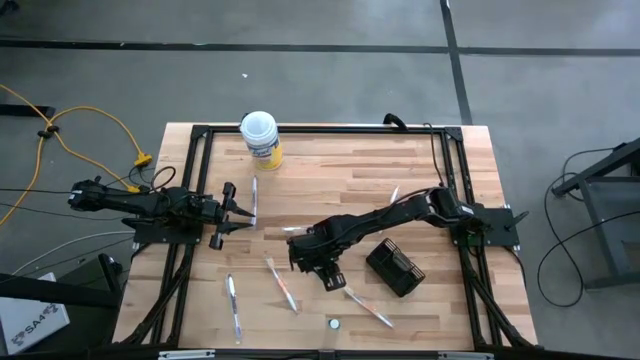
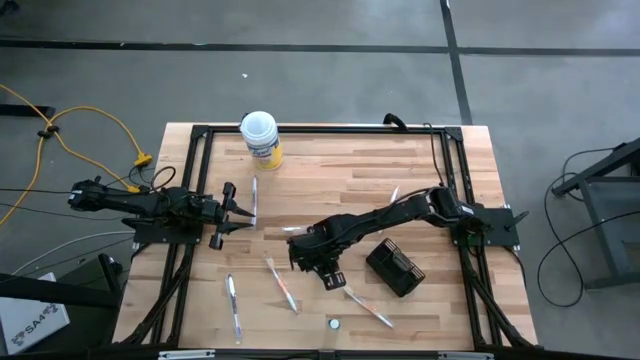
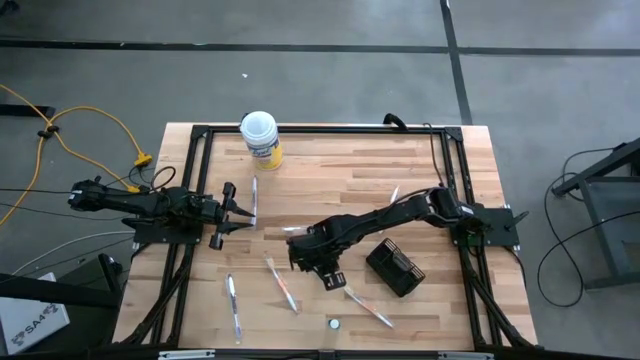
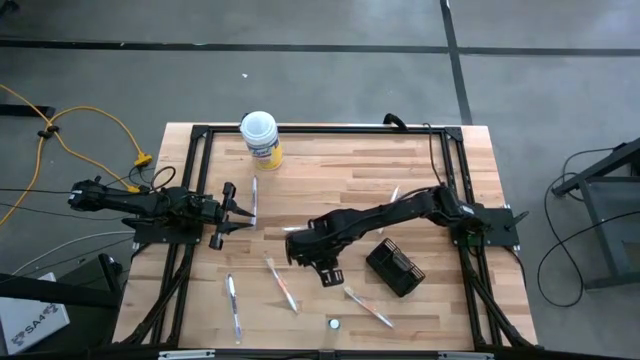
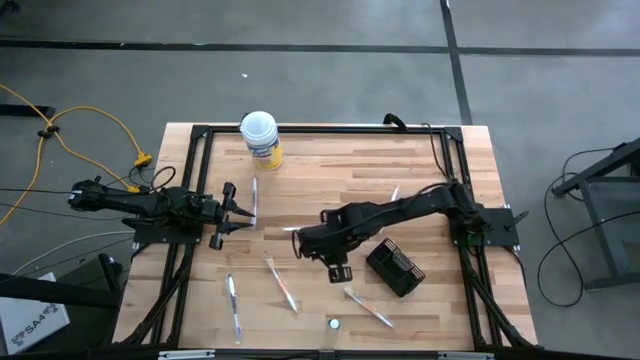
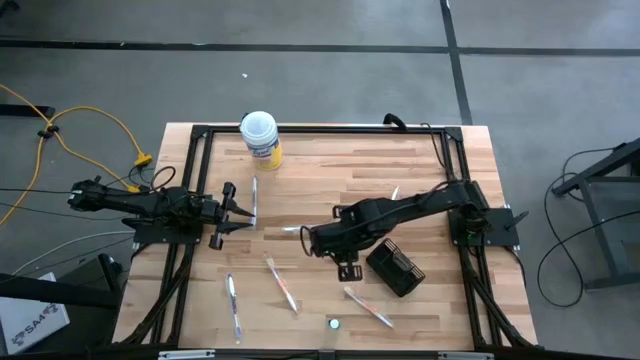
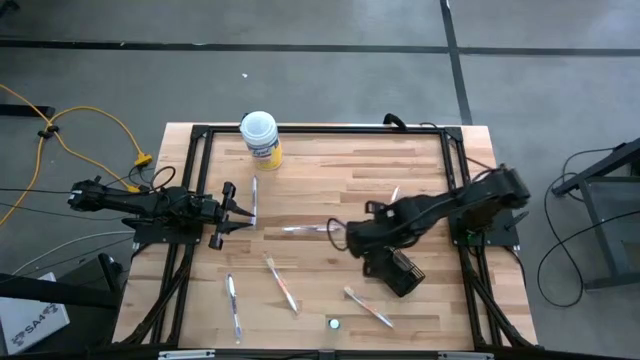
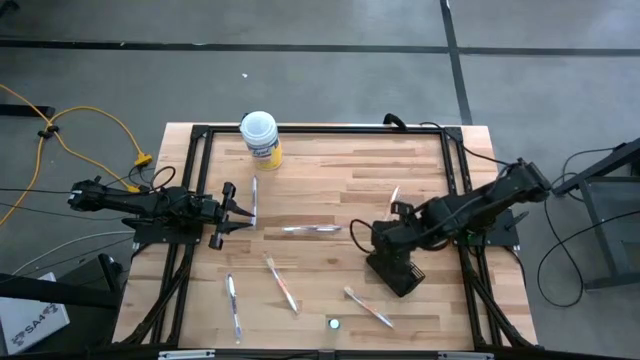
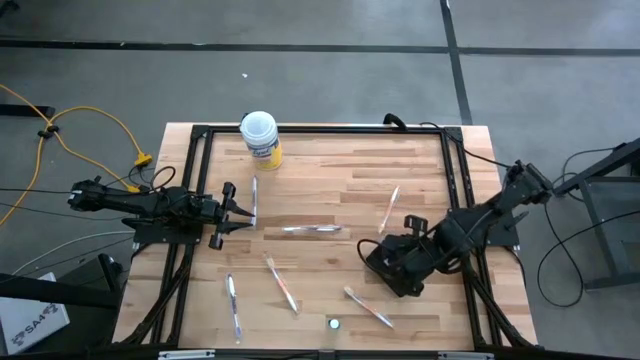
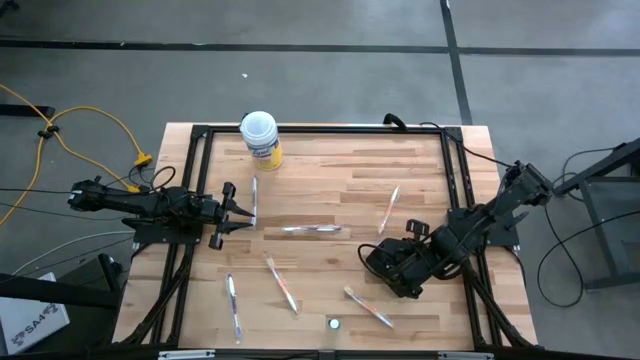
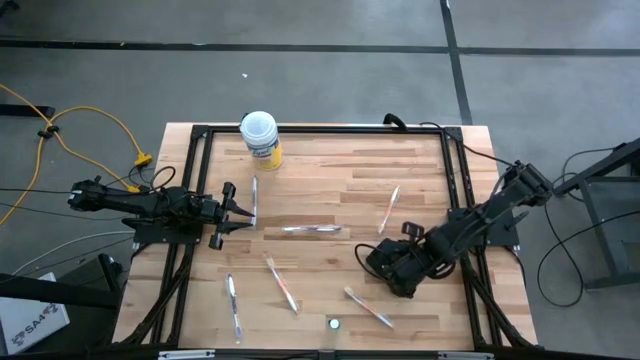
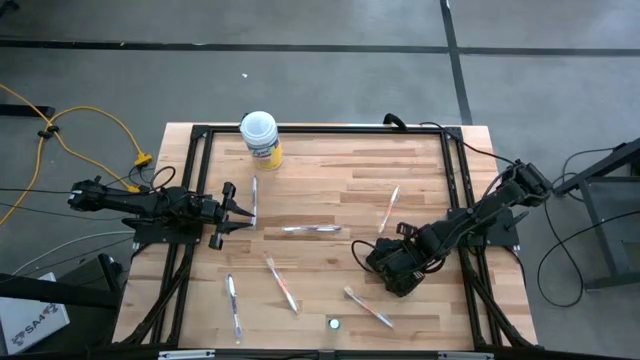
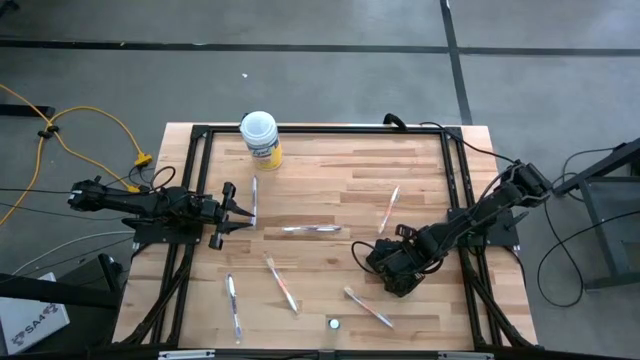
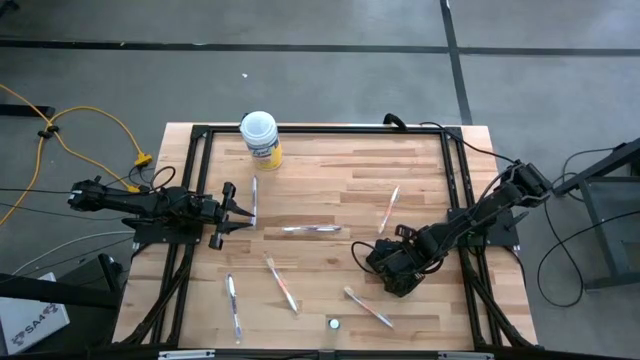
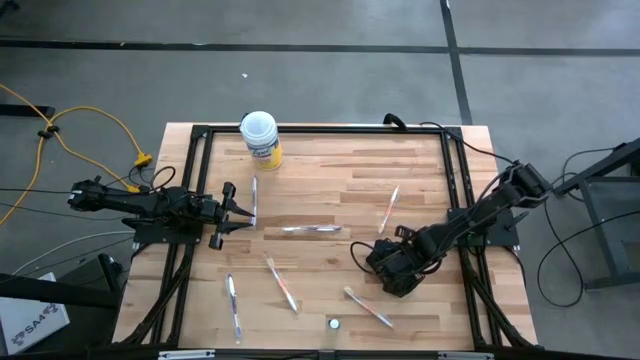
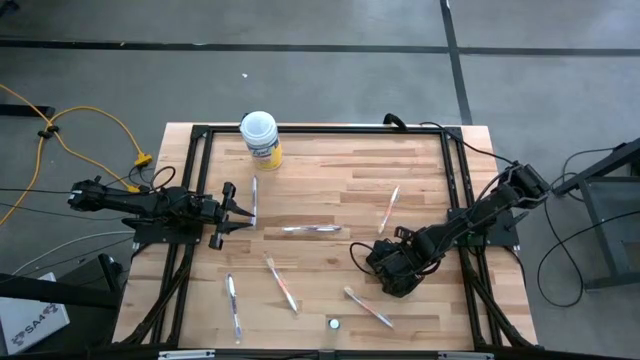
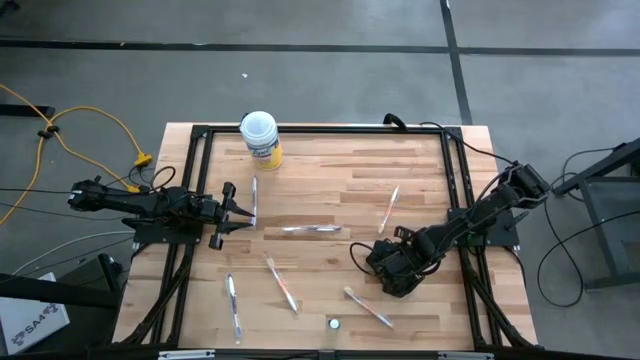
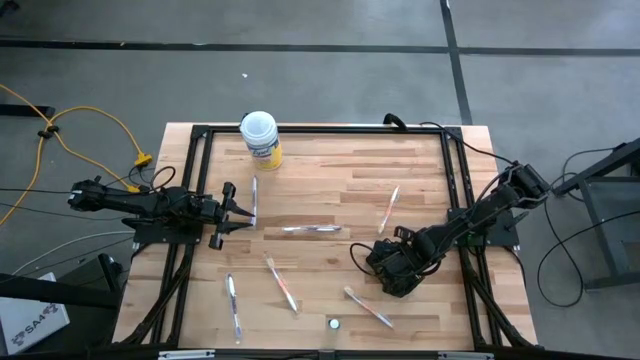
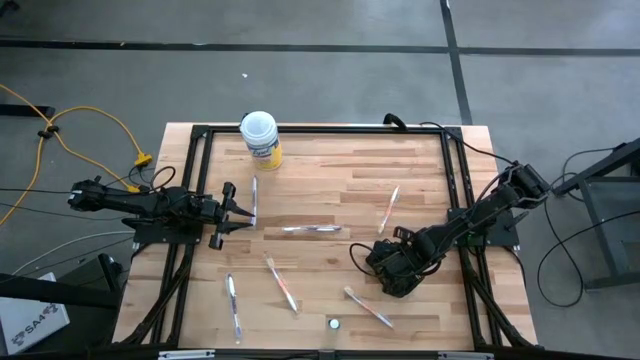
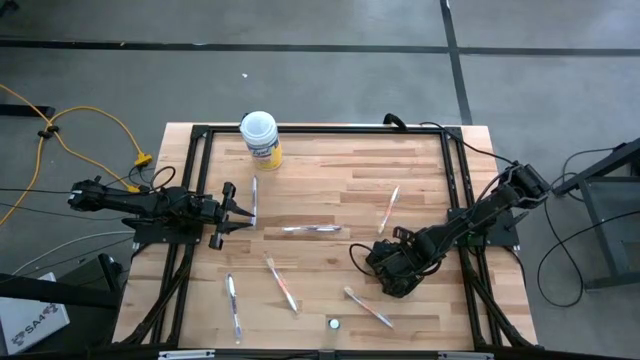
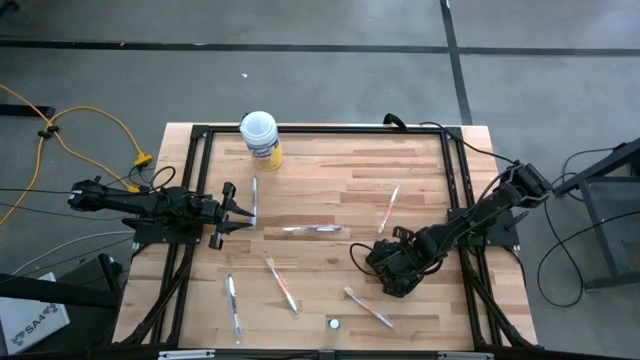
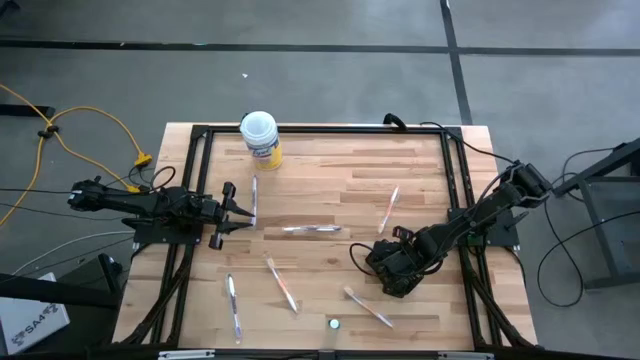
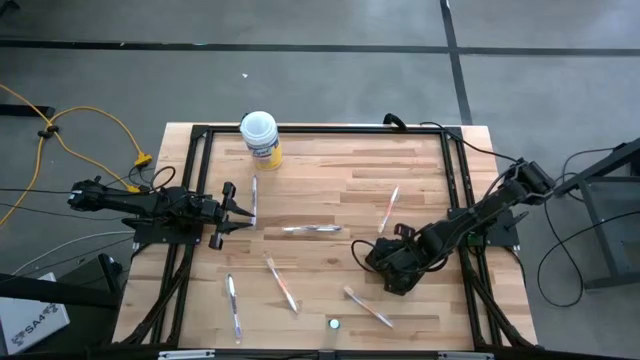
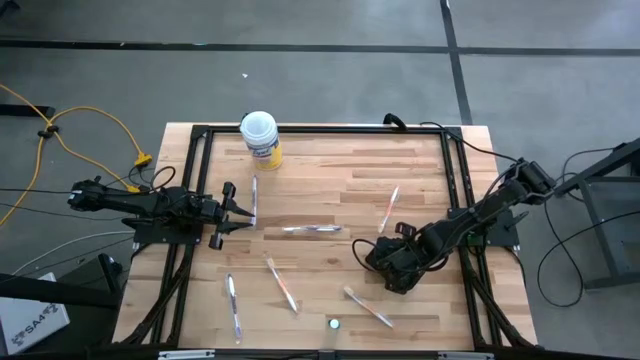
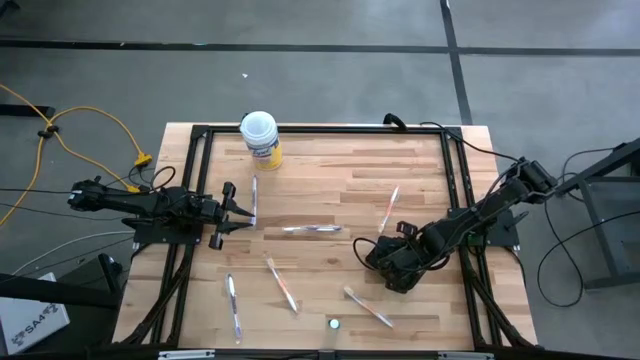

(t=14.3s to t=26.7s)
Task: Pick & Place toothbrushing station
Put the top blue mouthwash into the wire organizer
